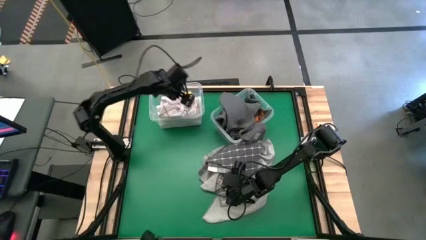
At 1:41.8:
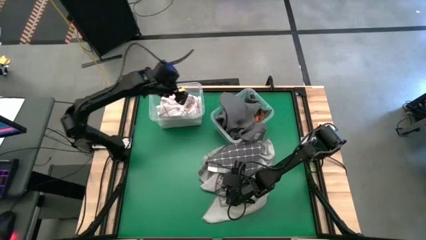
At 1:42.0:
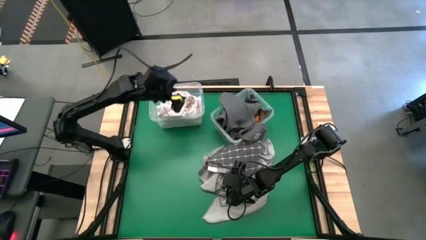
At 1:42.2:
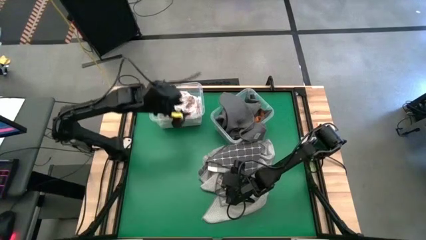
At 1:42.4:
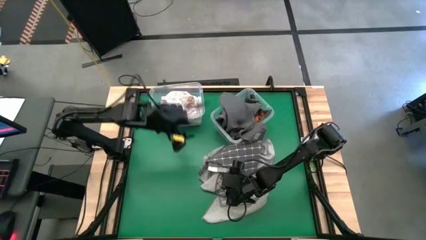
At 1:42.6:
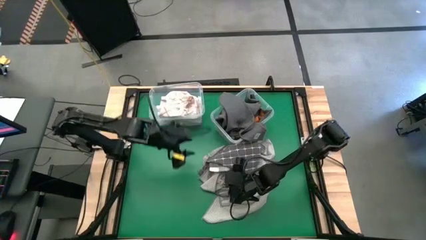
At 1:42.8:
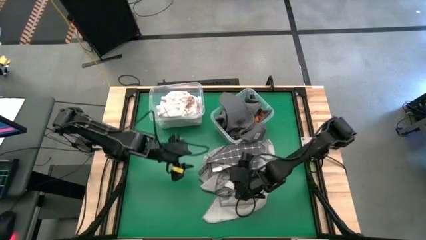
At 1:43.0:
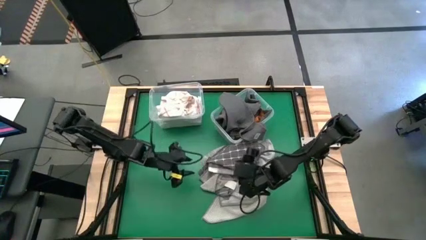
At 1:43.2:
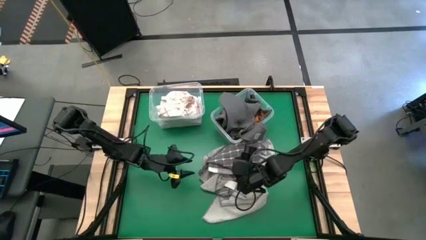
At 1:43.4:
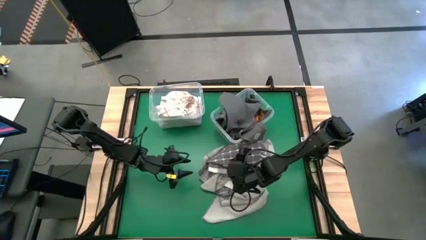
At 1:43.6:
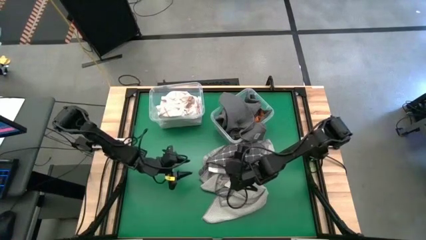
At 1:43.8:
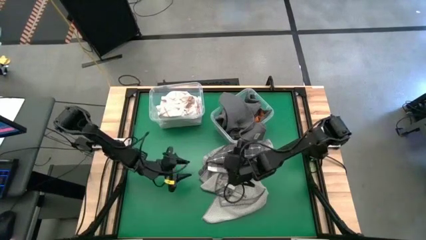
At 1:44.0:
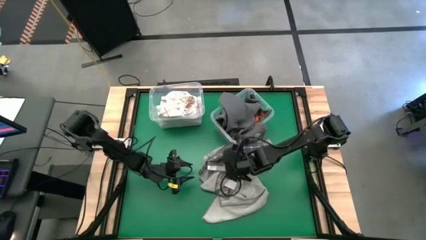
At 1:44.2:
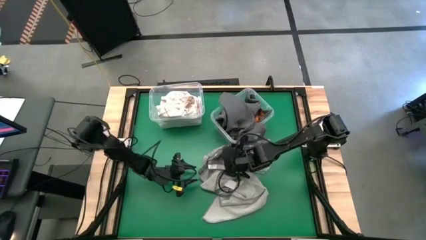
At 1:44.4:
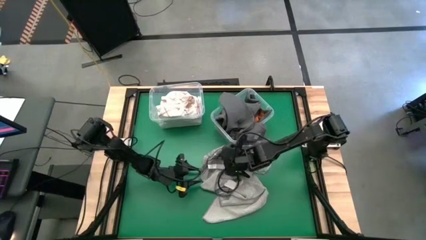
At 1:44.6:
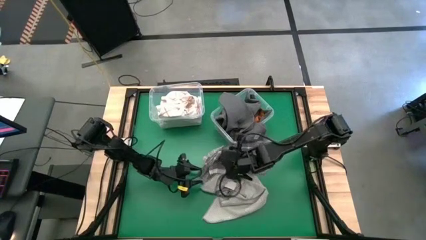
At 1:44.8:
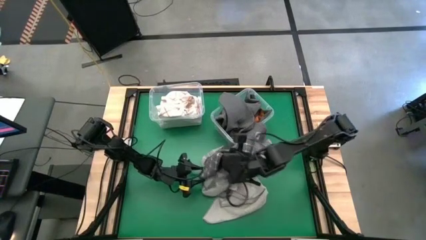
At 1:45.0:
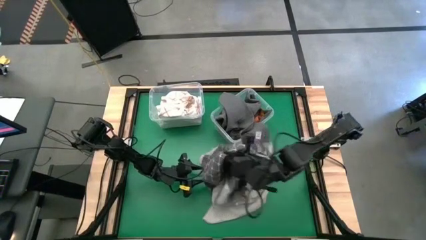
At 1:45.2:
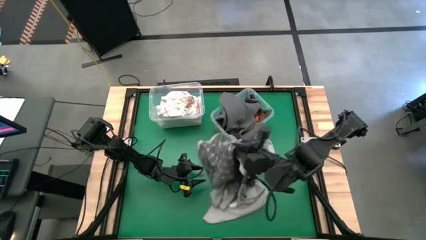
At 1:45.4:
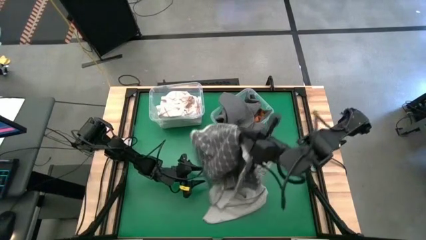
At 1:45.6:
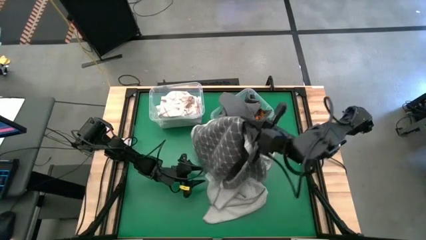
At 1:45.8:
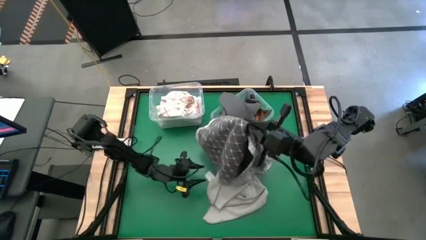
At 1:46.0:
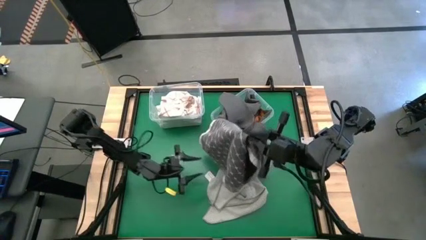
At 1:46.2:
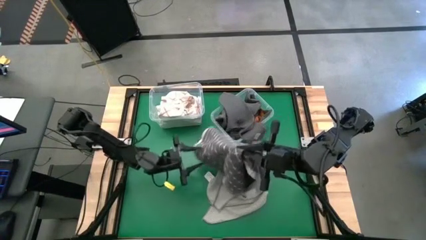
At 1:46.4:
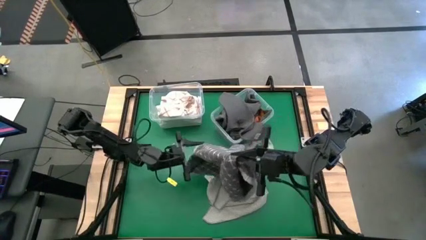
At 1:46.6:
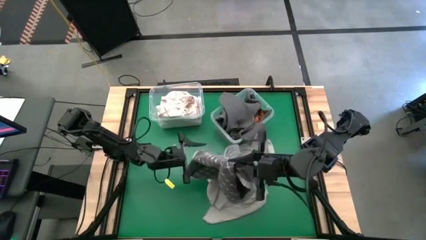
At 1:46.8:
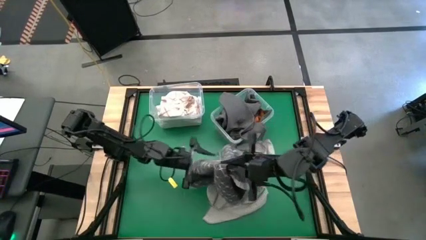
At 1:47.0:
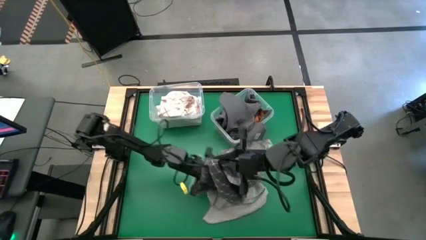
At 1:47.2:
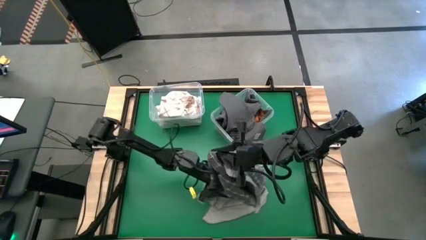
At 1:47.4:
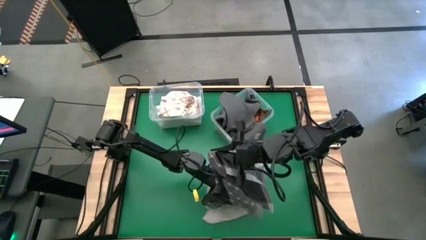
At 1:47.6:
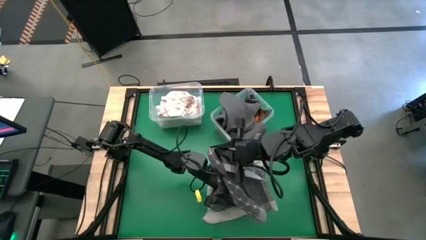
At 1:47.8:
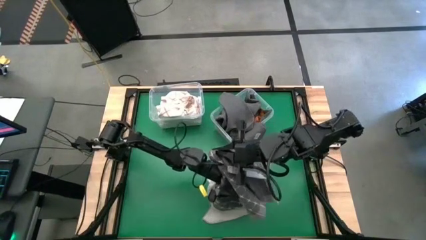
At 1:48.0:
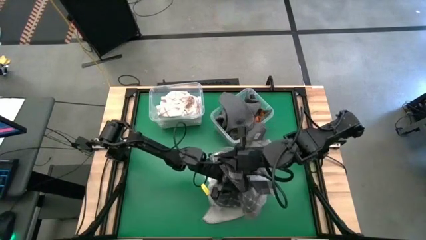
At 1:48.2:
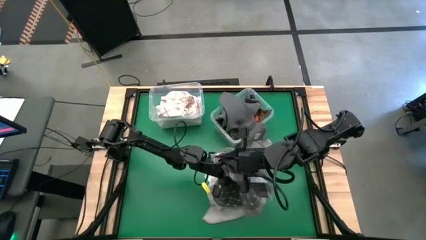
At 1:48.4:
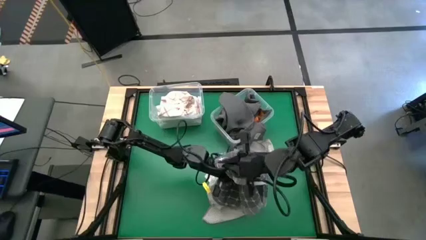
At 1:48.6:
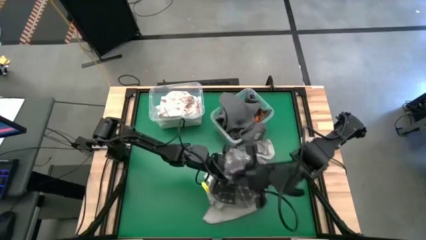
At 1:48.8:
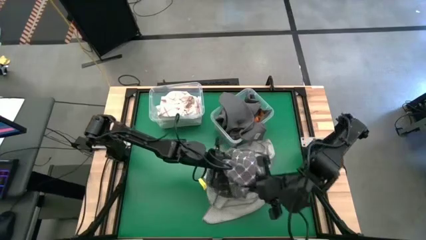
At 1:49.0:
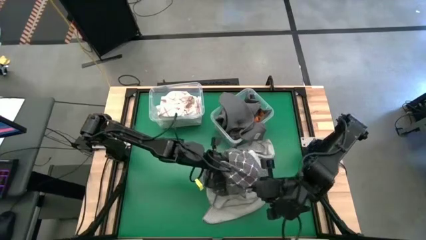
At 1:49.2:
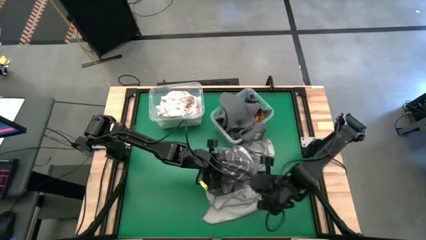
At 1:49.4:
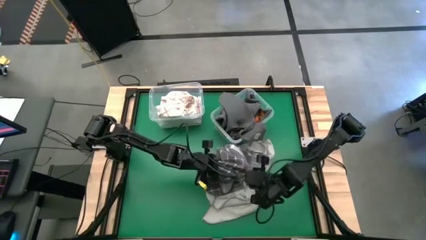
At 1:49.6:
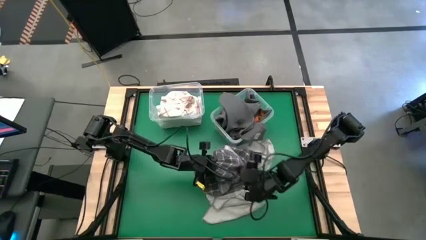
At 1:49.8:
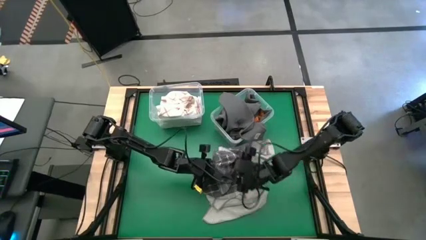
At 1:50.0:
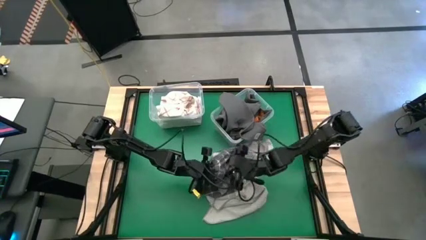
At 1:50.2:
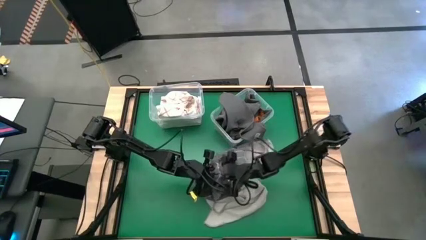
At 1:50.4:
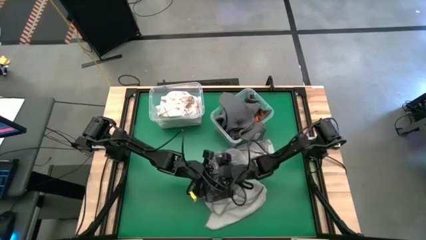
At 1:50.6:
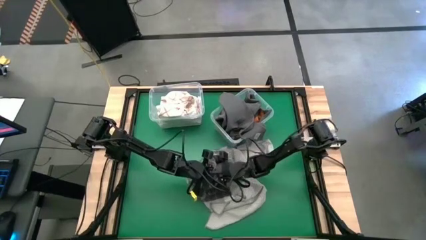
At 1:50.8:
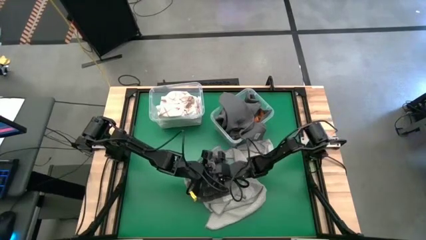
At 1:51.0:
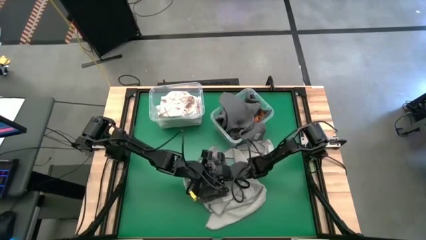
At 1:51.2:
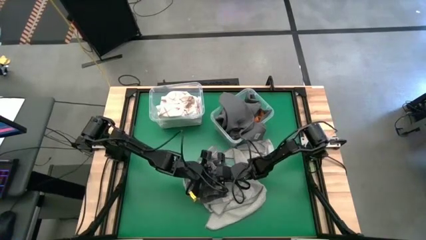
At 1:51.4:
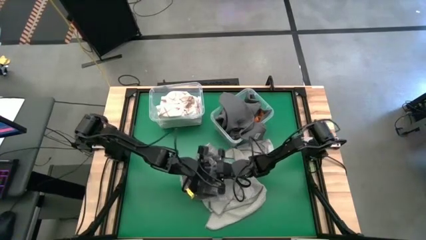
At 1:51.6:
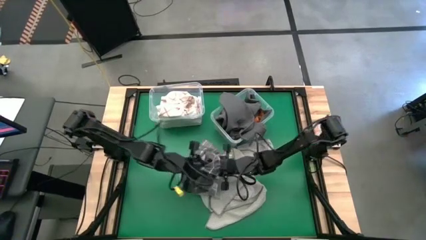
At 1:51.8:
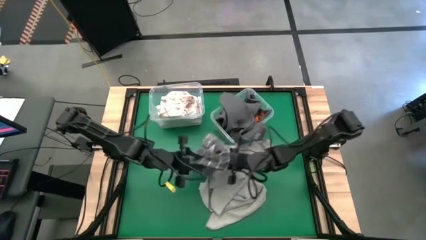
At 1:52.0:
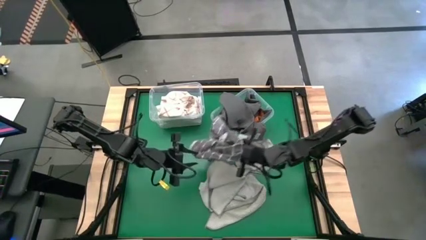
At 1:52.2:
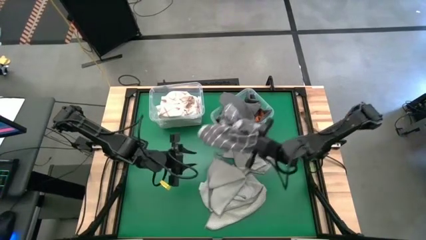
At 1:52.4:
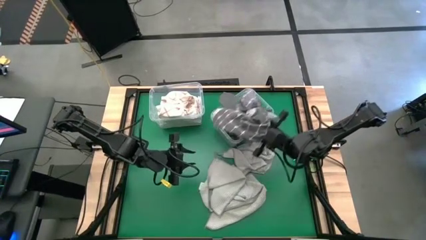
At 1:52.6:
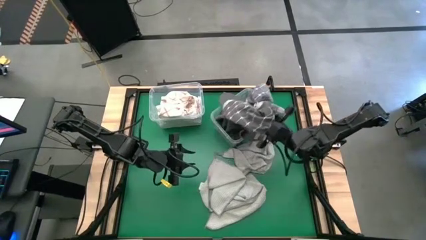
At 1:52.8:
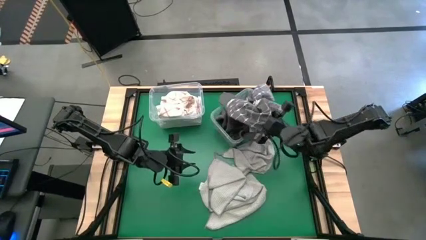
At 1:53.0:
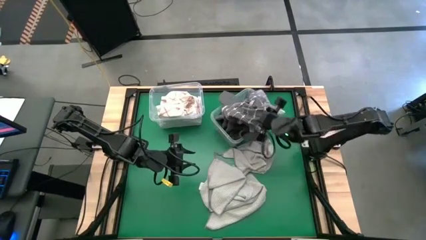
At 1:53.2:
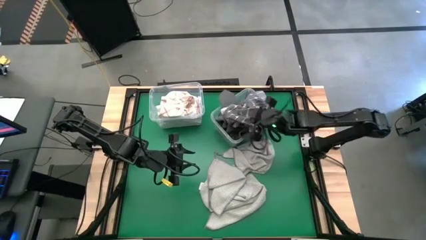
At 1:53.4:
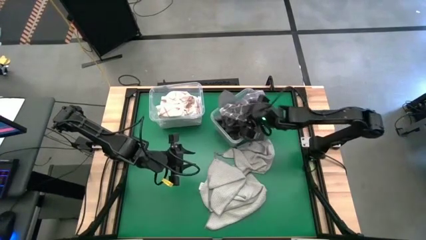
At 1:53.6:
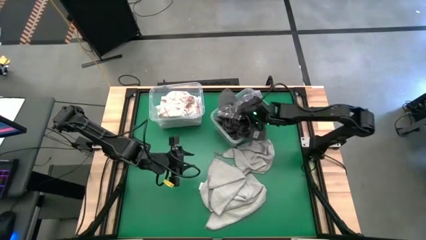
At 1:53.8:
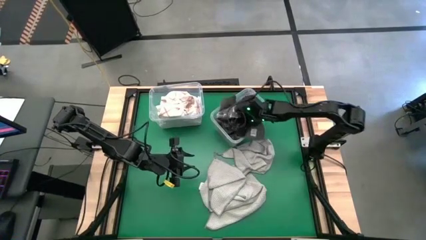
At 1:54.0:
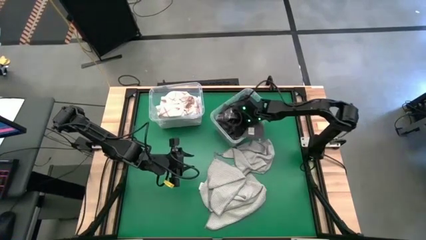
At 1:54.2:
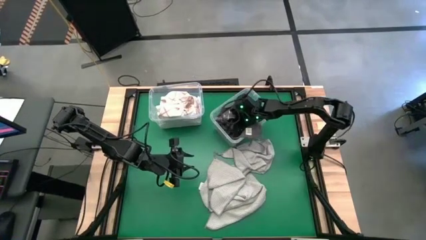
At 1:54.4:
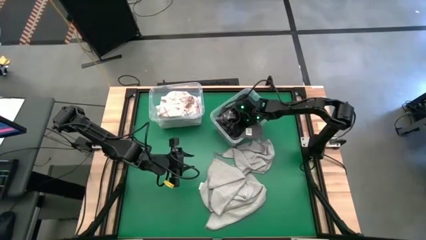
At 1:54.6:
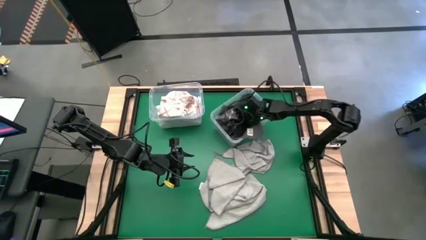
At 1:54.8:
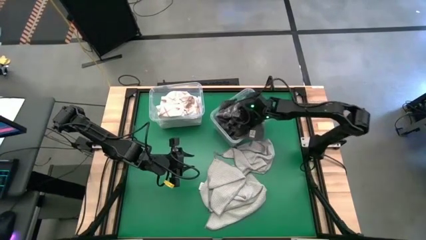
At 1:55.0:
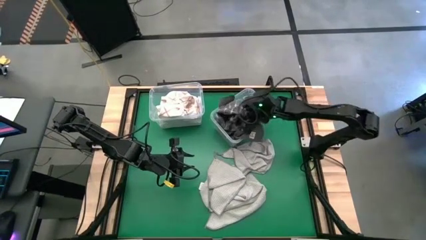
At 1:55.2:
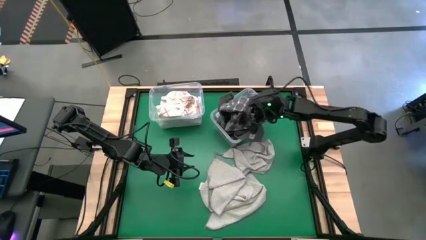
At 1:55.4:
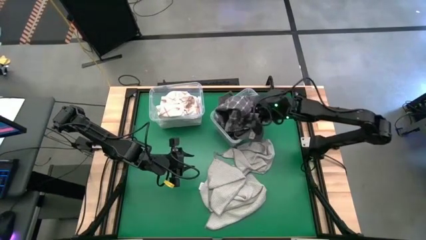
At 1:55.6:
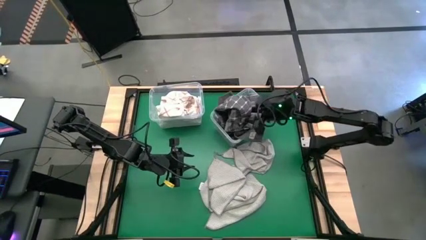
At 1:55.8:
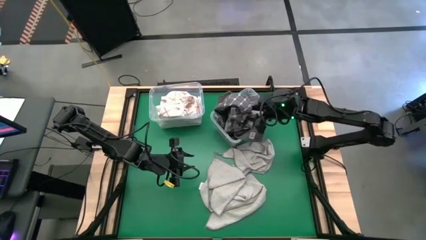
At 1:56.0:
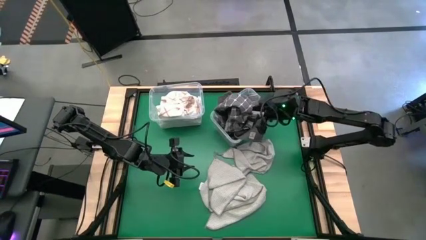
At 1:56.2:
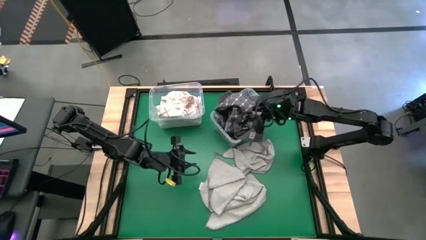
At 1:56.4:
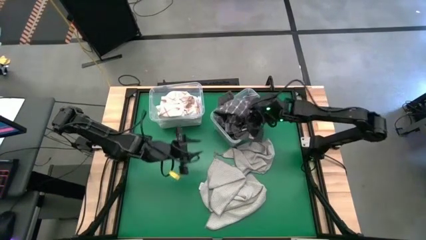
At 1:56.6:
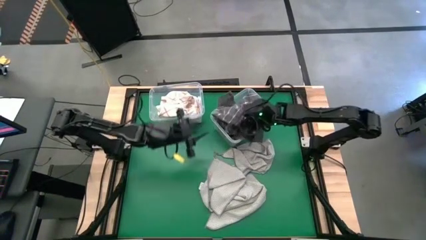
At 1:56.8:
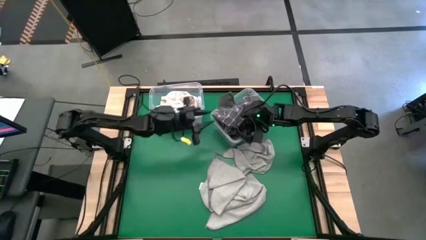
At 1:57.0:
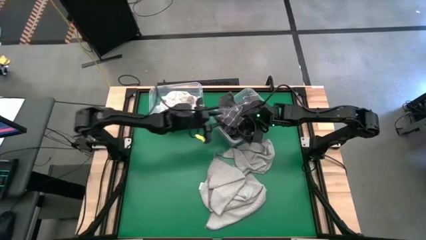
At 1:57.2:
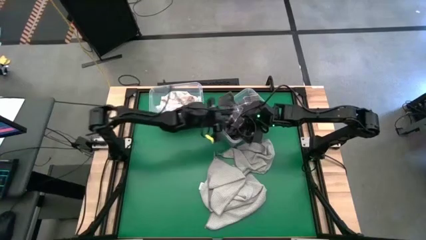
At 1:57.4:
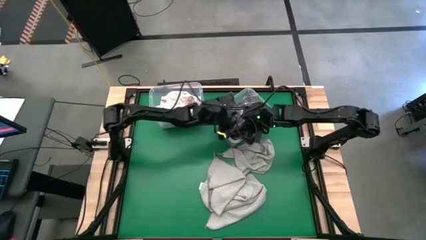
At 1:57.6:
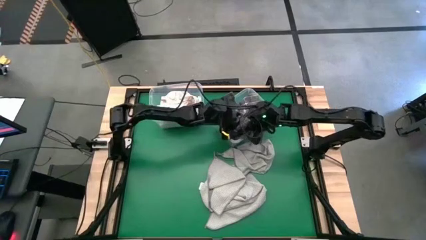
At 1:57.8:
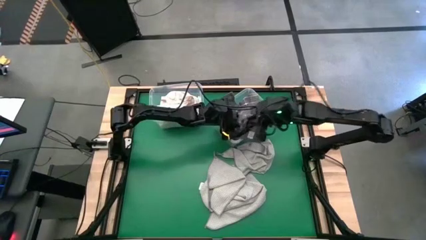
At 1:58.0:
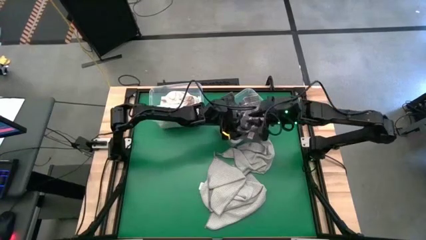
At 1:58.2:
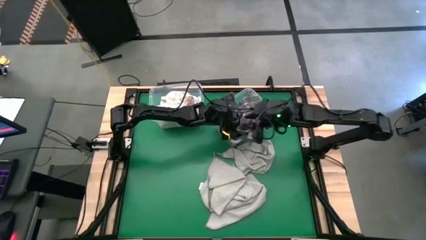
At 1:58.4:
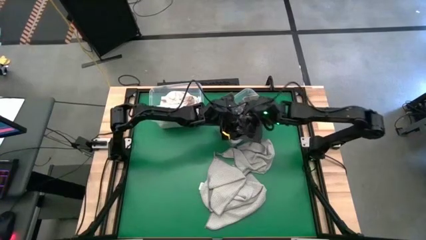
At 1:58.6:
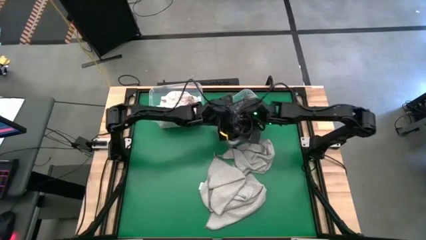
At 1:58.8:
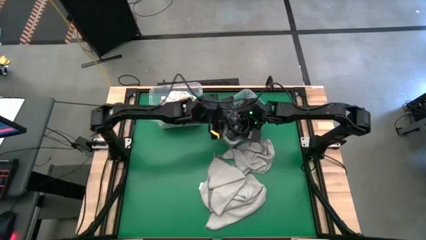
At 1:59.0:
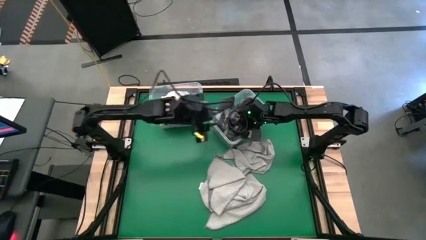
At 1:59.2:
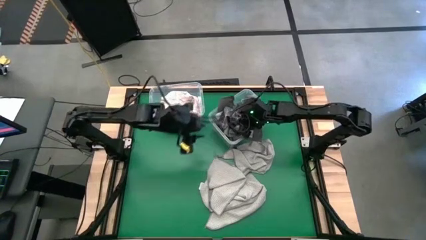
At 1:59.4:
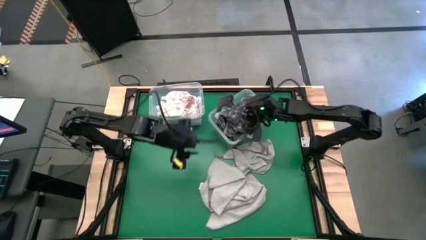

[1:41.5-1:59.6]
Task: Sort towels by color in basket
Put the gray patterned towel into the right transparent bin
